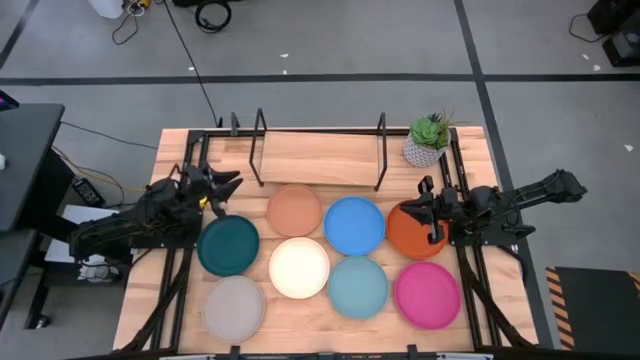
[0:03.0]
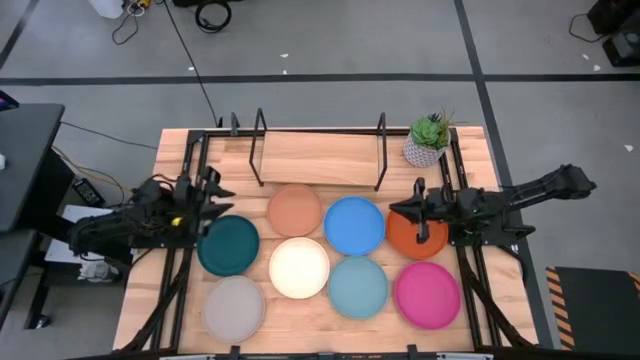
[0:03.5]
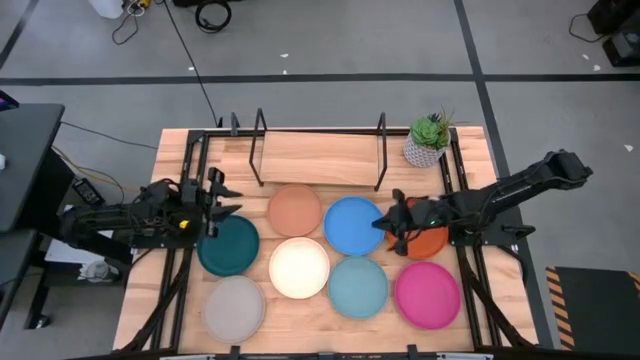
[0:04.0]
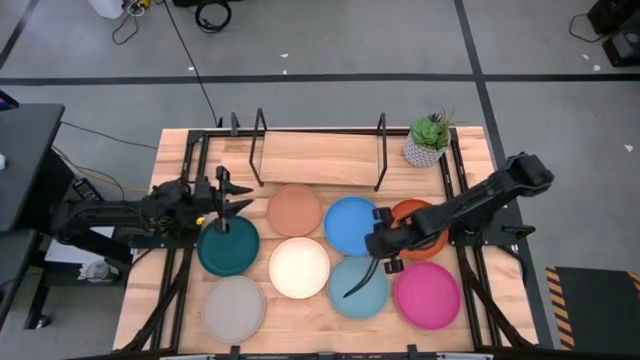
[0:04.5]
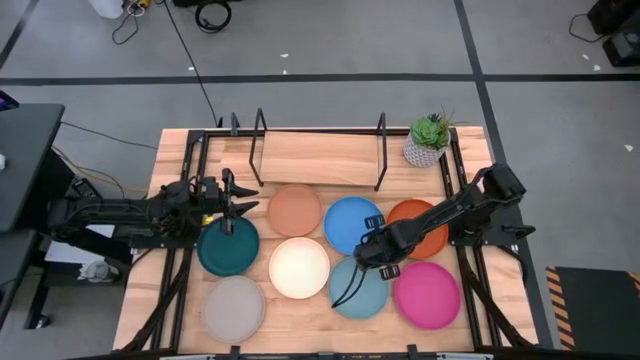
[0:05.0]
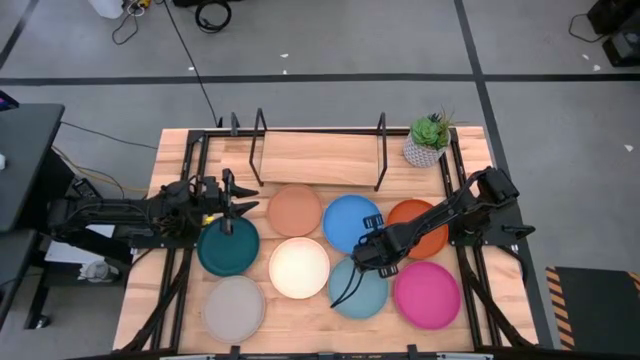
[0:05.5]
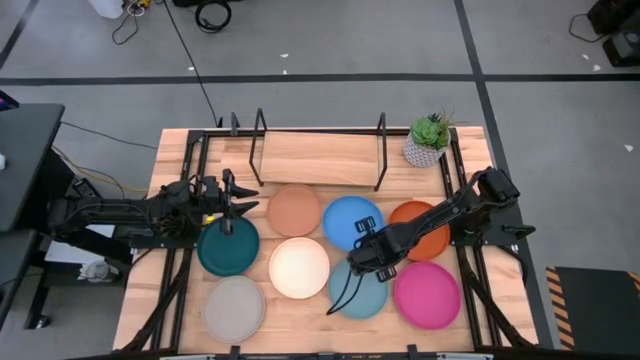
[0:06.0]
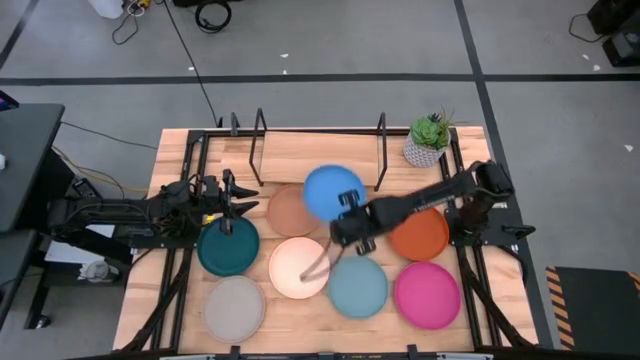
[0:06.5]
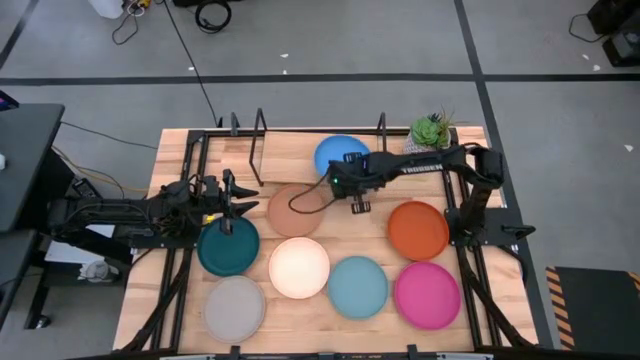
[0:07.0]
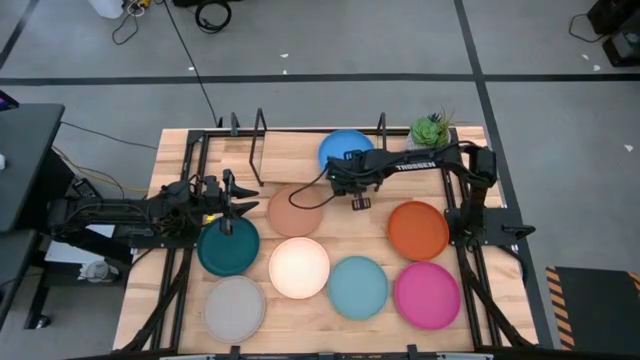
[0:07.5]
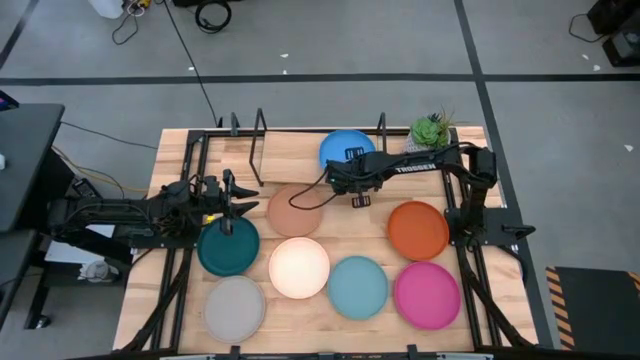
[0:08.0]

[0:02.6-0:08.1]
Task: Place and stack plates onto a shelf
Put the blue plate on the shelf

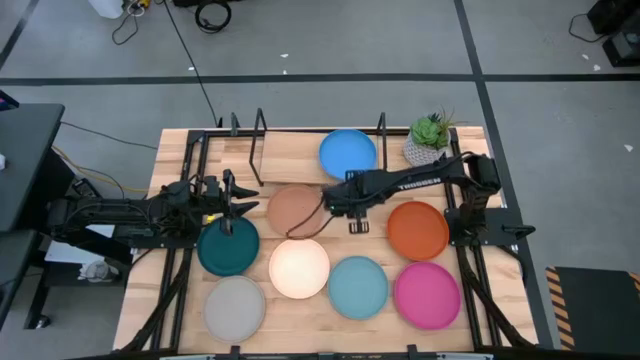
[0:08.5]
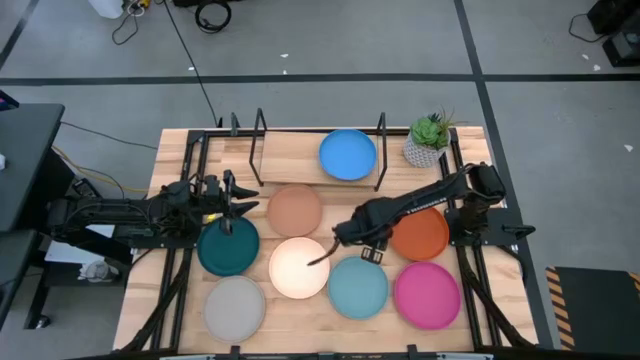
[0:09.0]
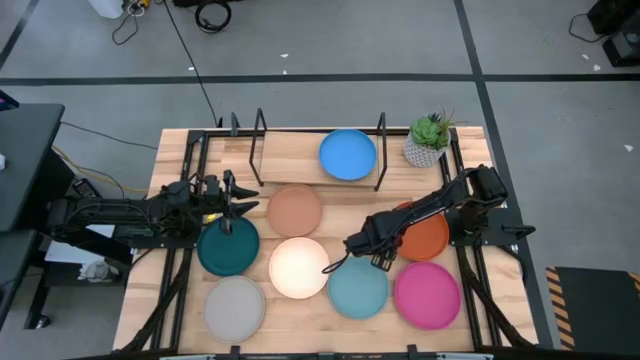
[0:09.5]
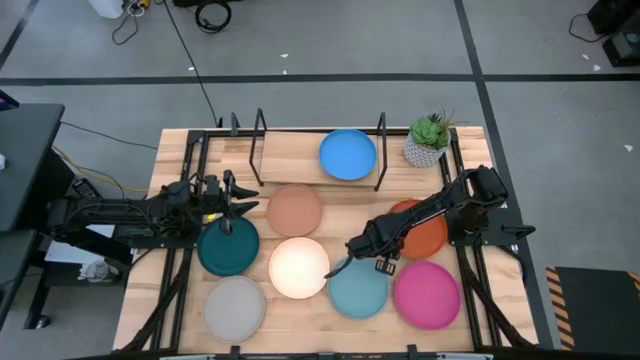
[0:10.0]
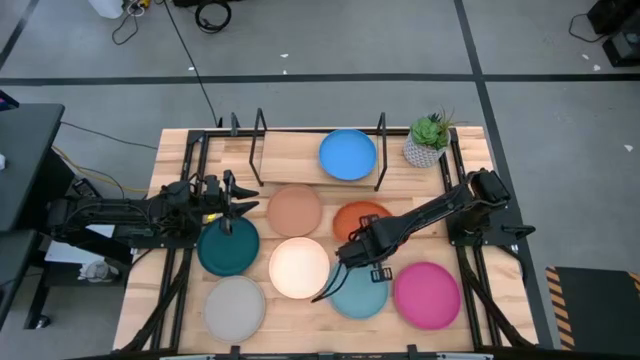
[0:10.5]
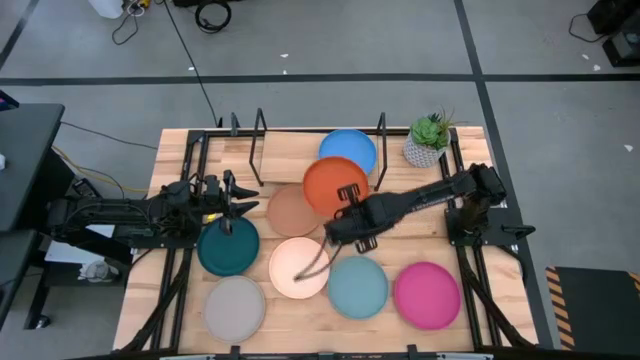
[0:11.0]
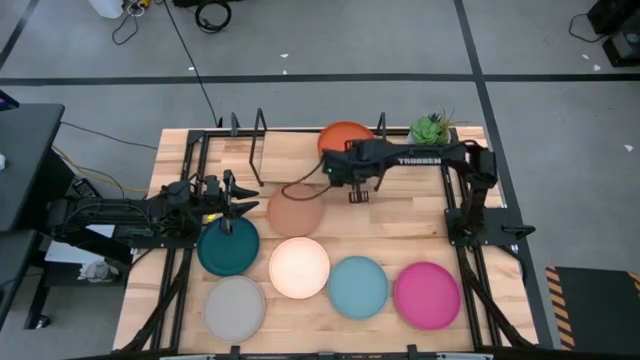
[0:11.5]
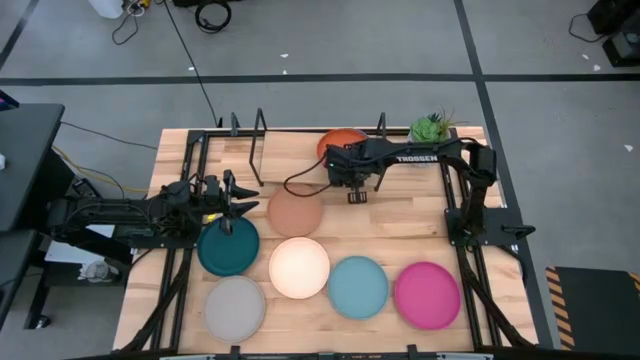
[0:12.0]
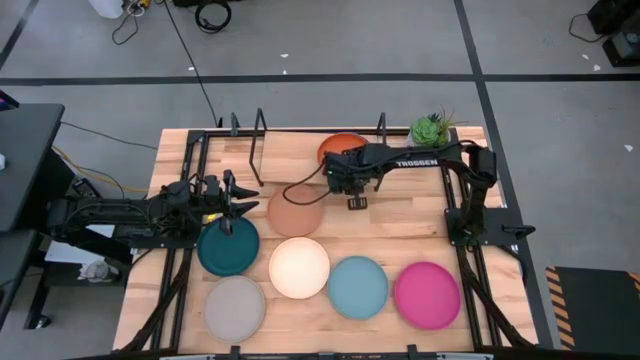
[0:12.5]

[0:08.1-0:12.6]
Stack the orange plate on top of the blue plate on the shelf

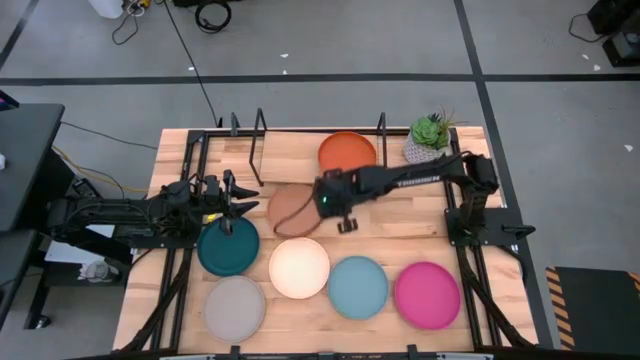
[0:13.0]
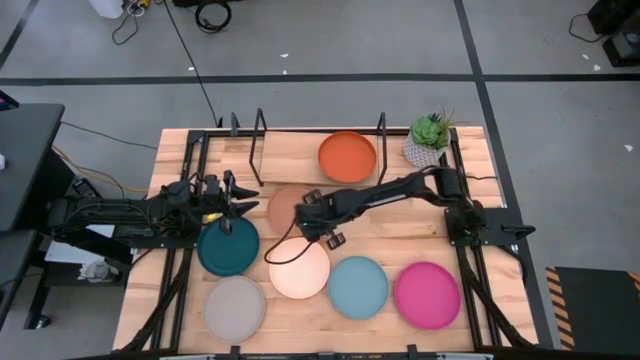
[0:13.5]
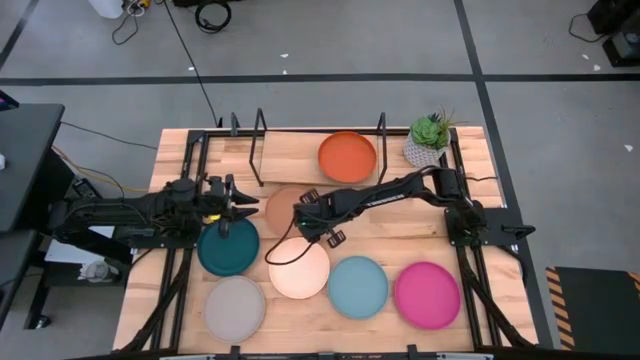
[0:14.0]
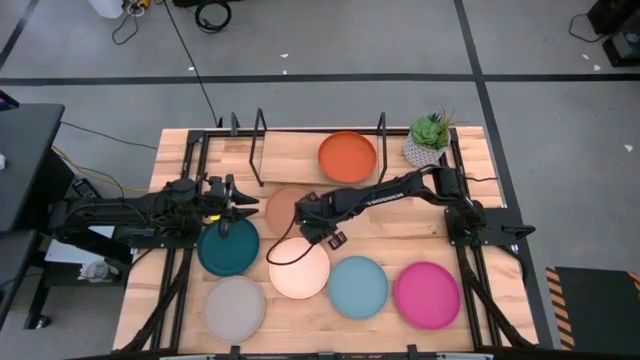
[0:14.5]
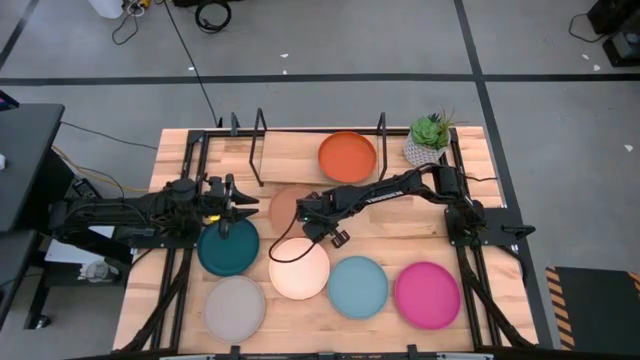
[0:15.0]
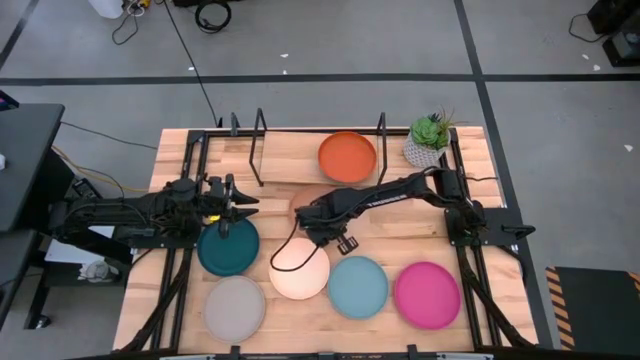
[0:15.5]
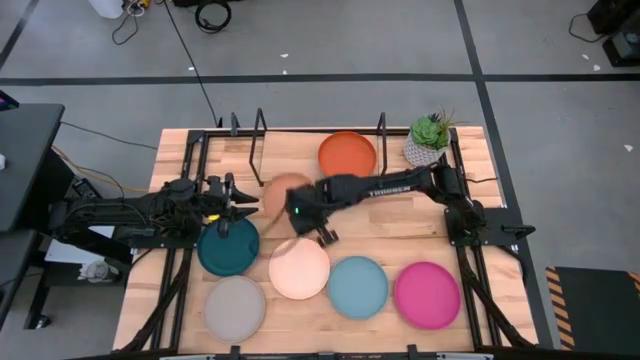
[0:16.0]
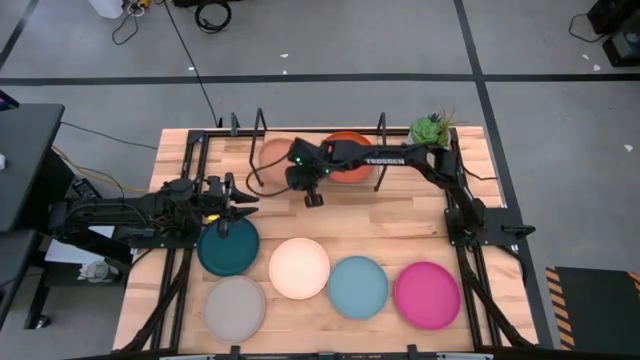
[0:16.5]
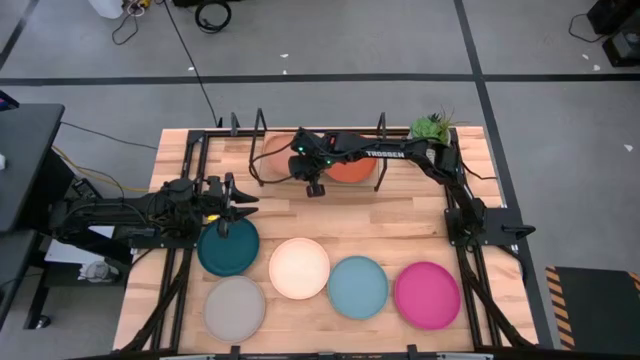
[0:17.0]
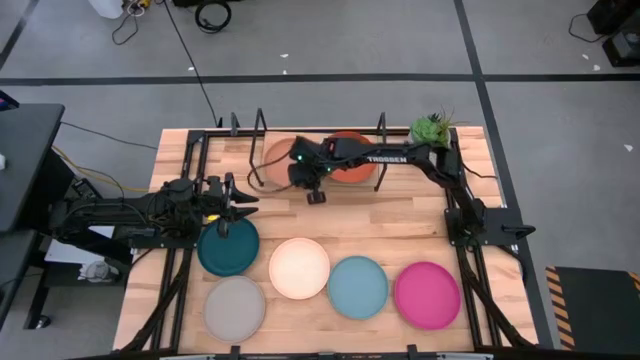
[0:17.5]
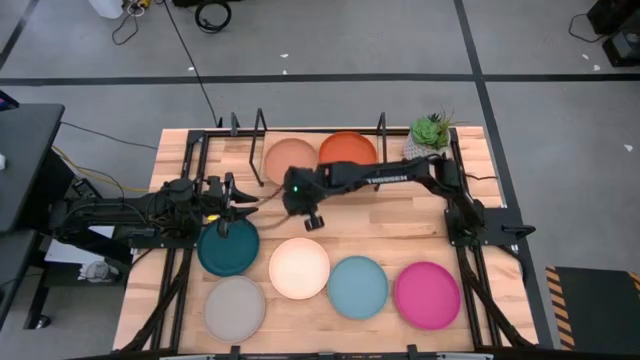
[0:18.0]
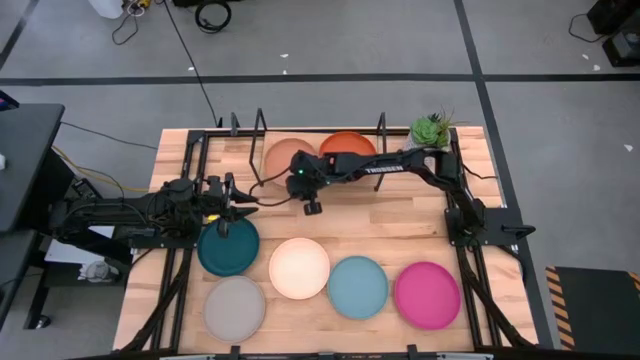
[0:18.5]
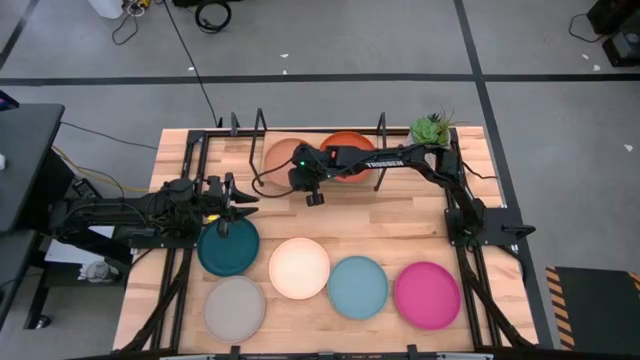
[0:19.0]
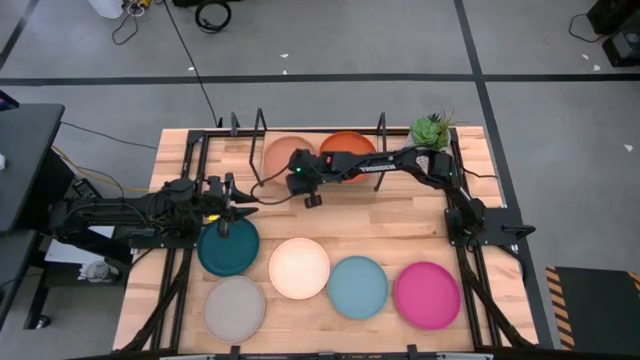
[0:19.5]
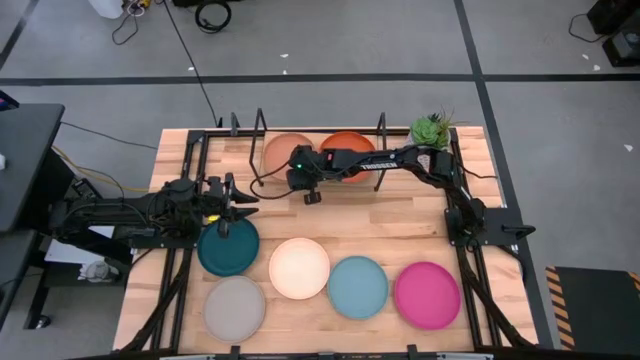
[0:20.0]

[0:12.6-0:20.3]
Put the brown plate on the shelf

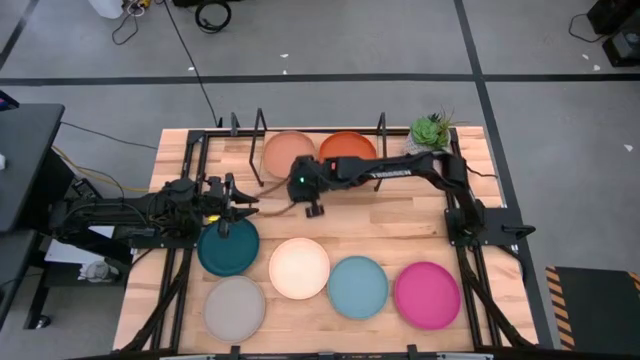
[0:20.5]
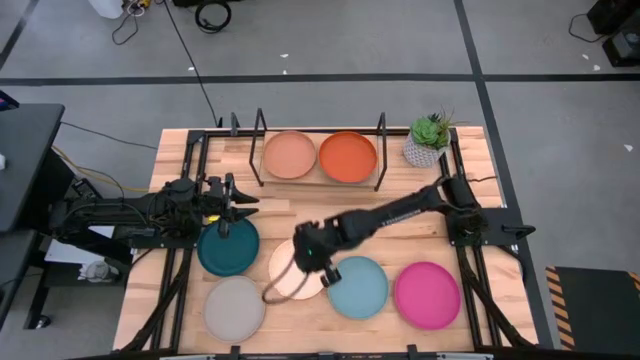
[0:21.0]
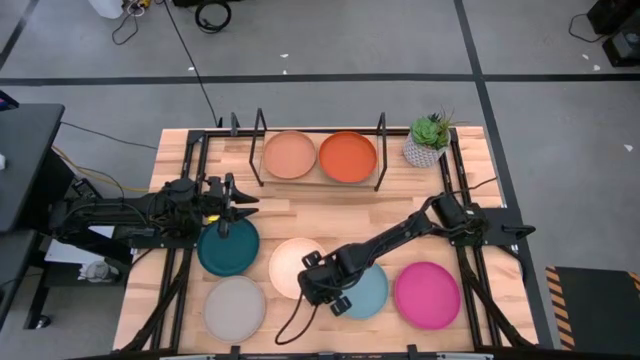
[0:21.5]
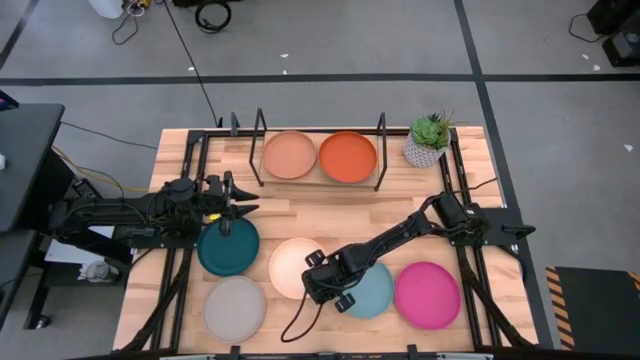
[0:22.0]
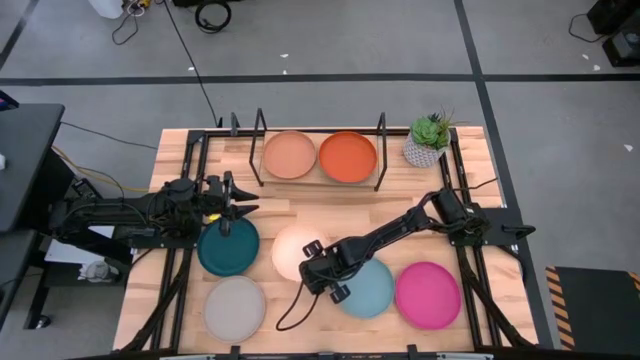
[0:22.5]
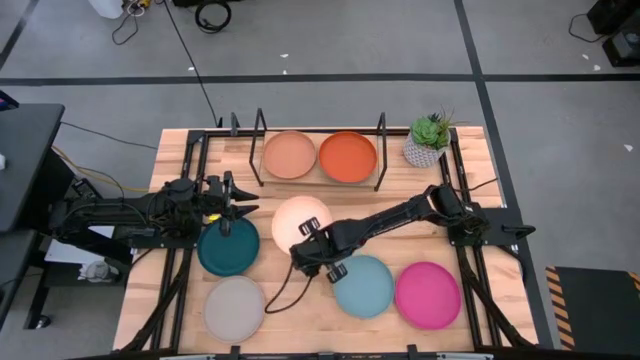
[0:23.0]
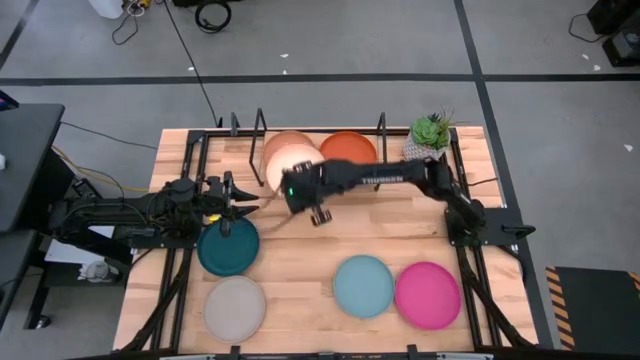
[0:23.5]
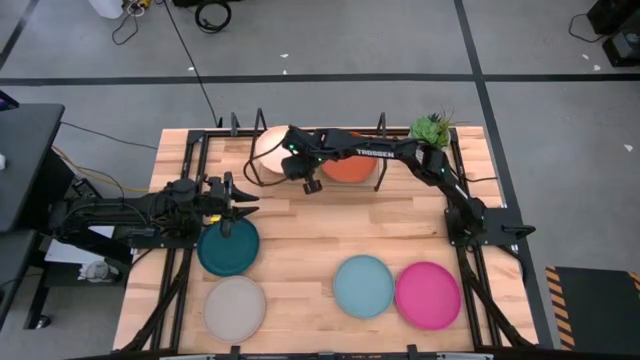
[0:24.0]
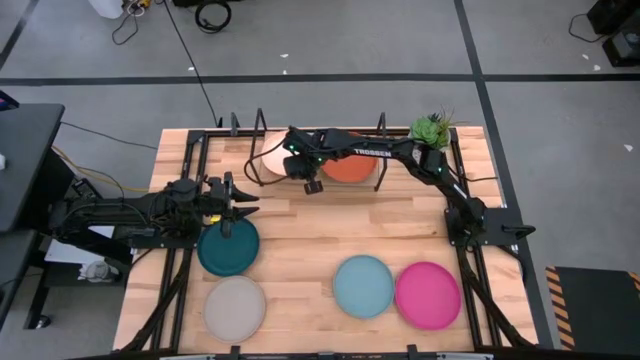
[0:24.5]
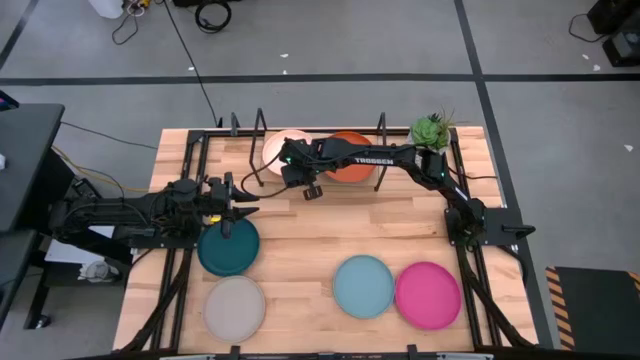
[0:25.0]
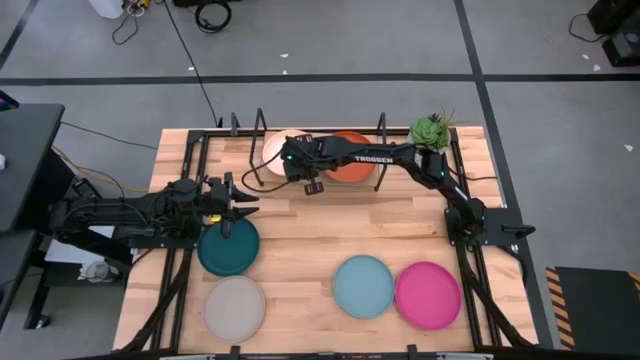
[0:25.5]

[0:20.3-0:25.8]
Stack the light orange plate on top of the brown plate on the shelf
